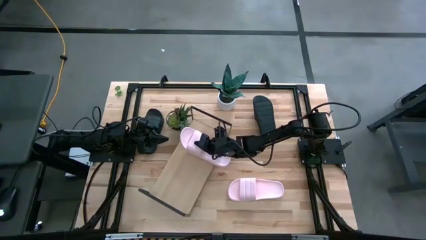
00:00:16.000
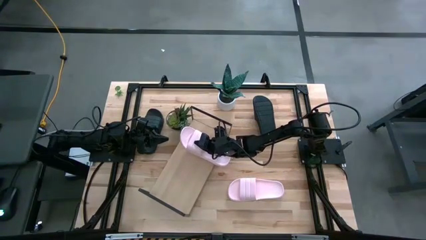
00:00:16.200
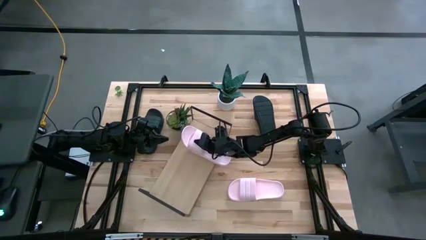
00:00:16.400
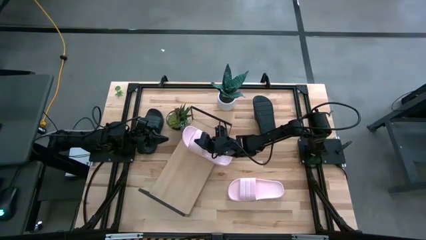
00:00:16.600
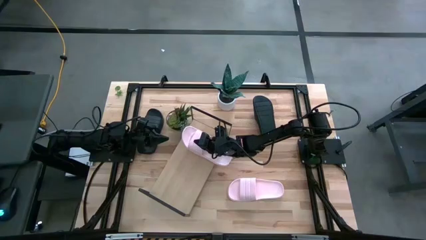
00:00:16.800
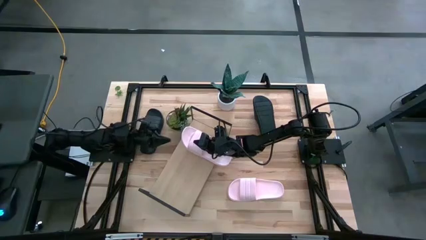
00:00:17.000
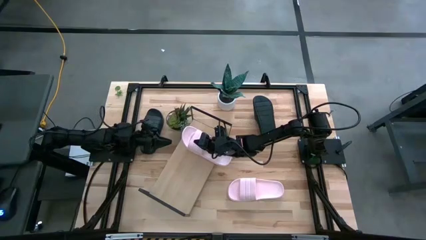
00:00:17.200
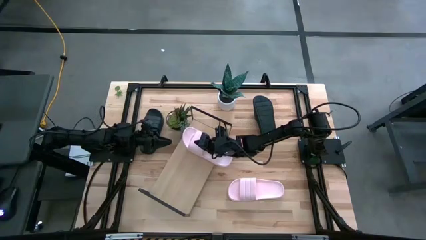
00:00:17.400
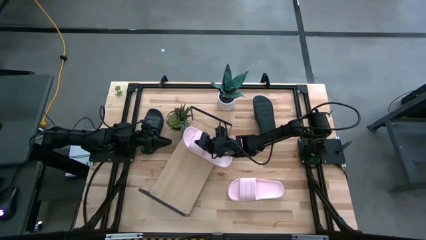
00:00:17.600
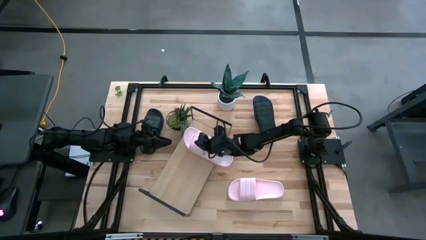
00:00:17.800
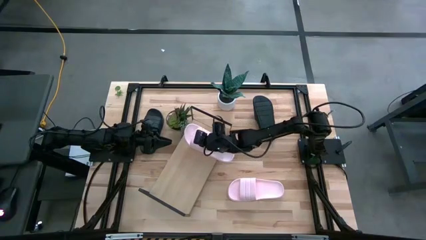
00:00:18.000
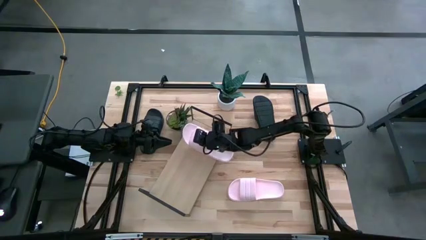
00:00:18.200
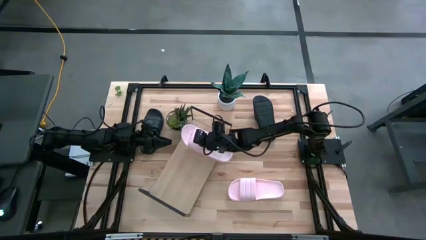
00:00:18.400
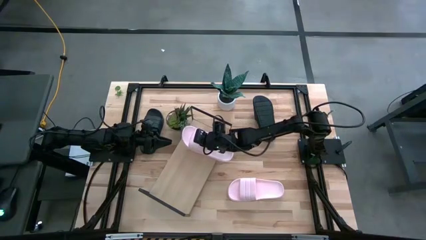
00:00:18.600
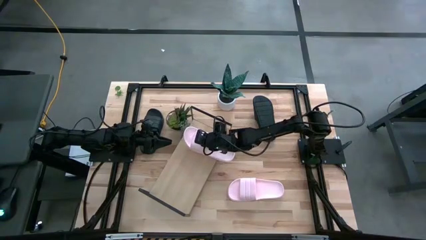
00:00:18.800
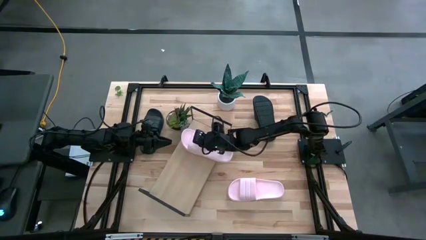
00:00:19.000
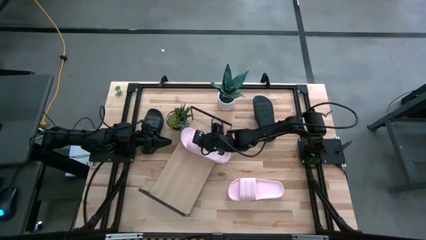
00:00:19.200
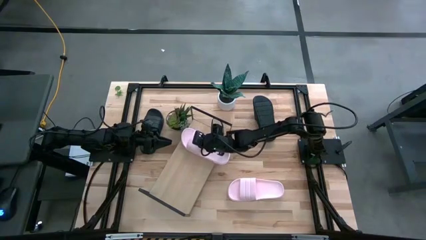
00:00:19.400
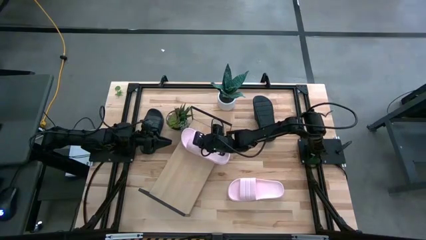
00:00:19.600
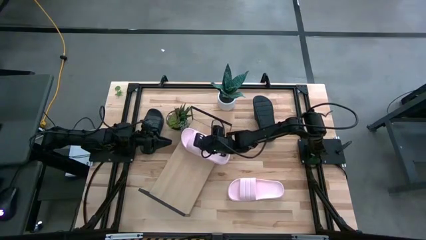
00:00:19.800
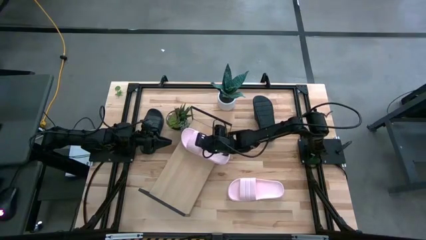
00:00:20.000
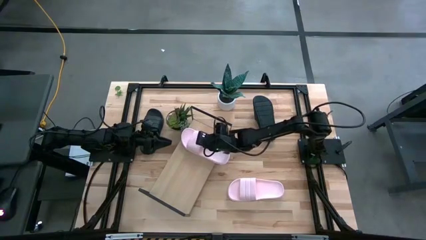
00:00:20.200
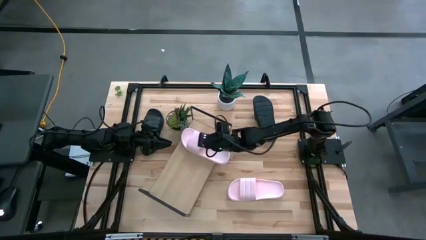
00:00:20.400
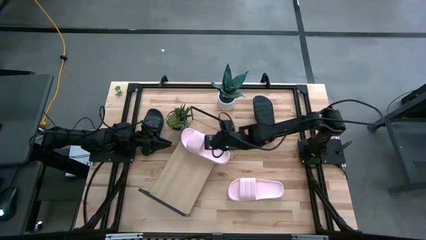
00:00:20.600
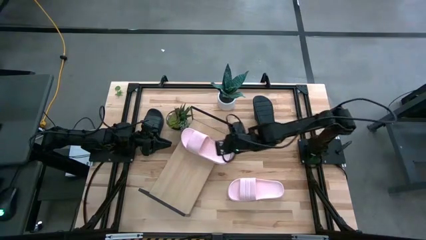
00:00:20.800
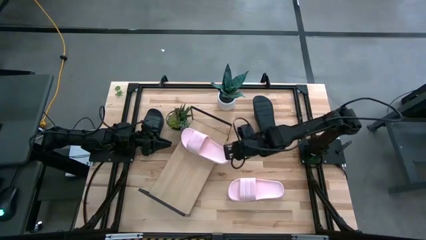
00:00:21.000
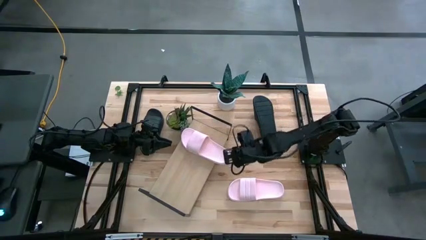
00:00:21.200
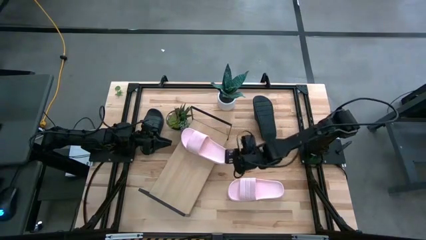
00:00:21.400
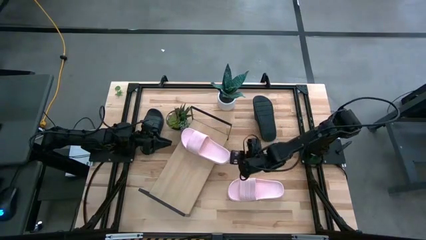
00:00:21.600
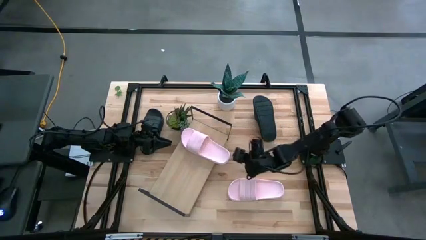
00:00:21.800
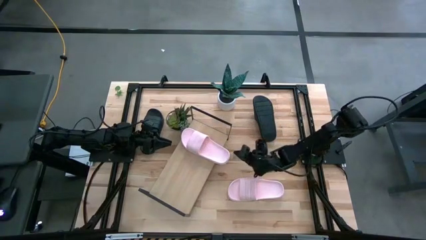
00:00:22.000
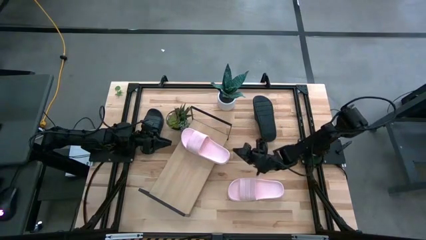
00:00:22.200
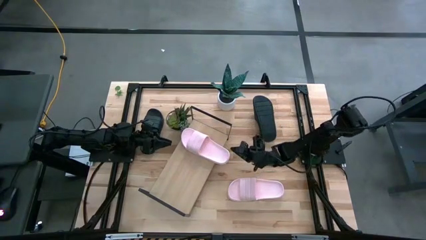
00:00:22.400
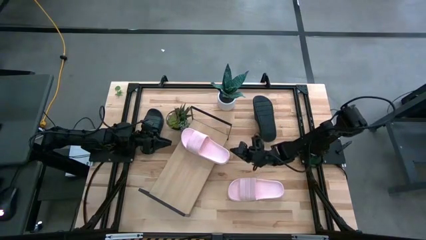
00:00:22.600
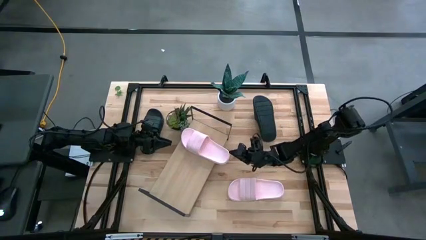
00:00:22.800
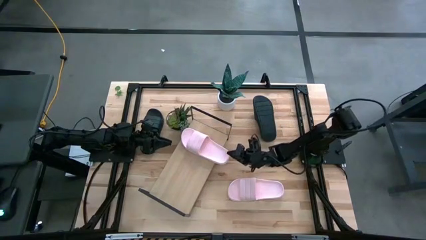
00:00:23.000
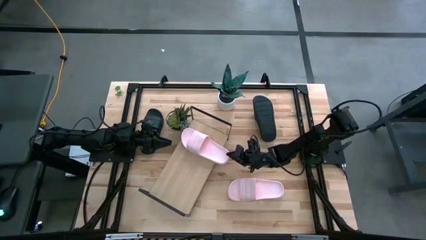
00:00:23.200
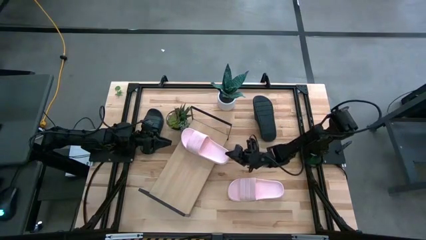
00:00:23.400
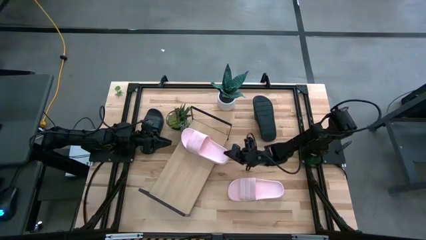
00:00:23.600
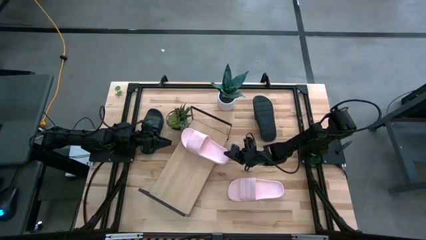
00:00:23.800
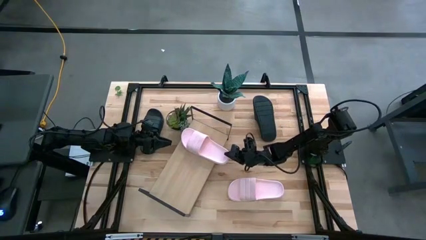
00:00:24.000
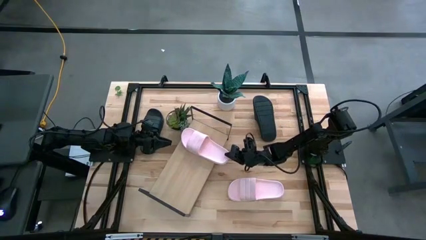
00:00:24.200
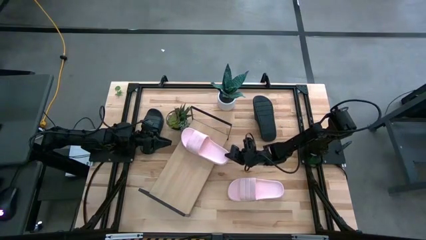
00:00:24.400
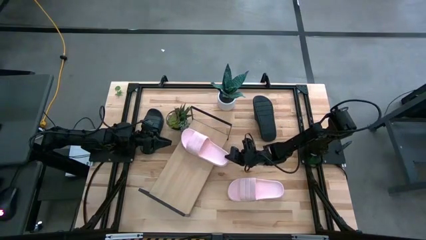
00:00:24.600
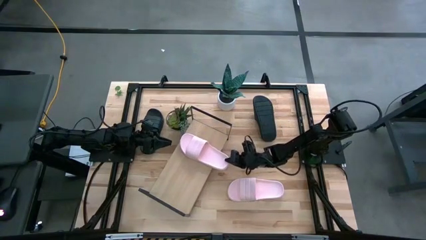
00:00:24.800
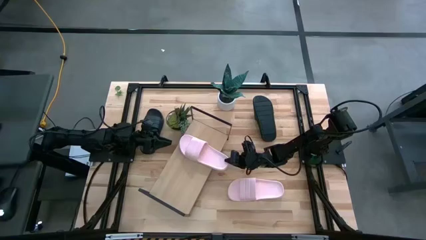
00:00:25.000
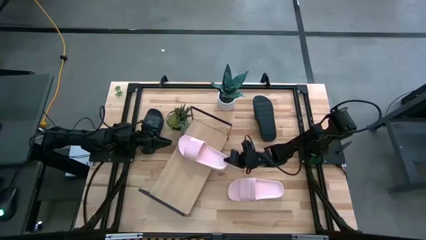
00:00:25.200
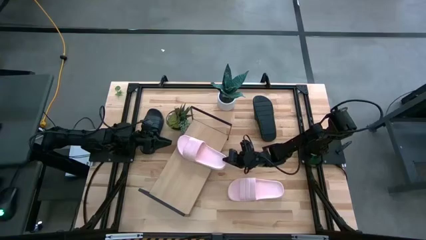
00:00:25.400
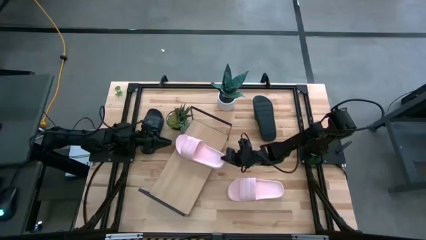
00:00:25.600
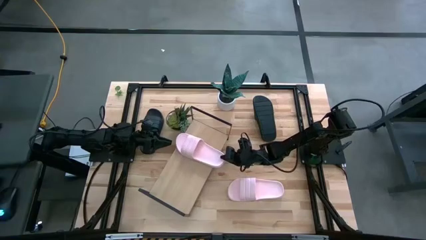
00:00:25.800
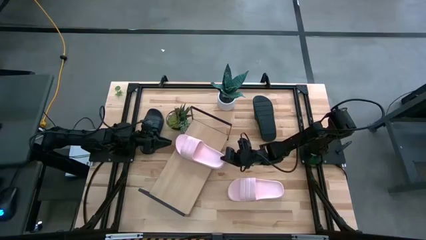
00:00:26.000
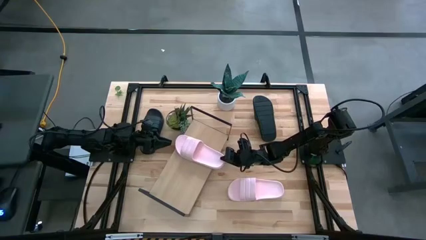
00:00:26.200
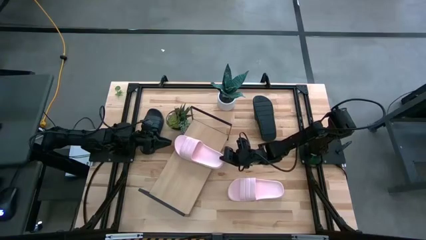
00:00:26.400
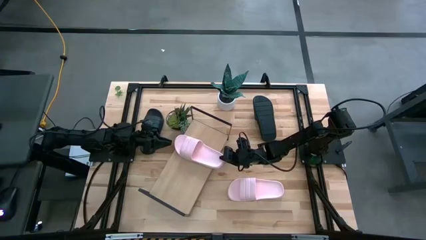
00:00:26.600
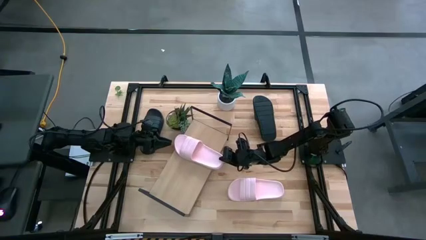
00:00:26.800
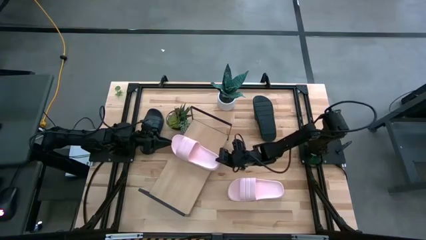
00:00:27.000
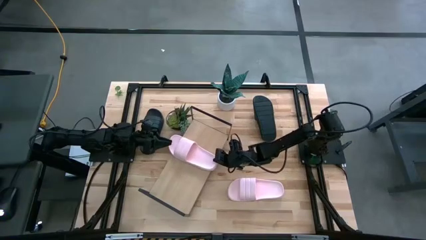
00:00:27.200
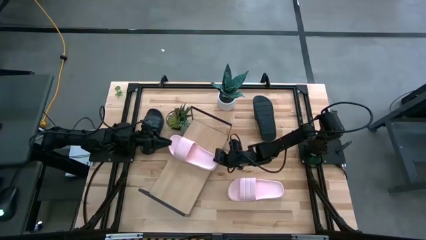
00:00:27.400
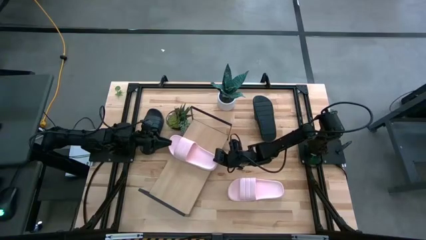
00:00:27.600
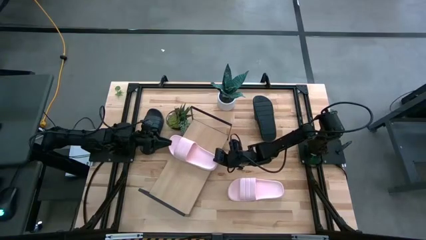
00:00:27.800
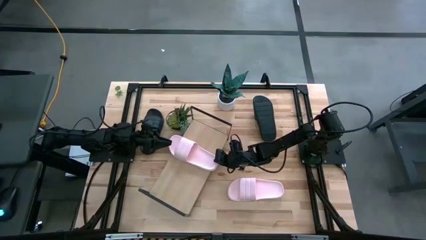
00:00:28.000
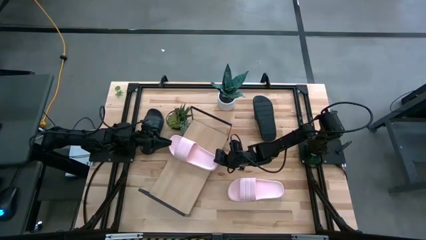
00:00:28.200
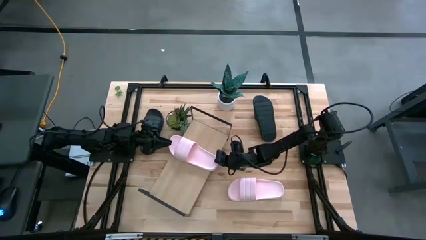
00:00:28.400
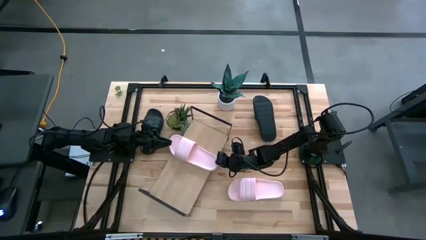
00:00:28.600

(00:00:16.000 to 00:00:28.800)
Task: Pick and place slides into the shelf
Put the top pink slide on the shelf
